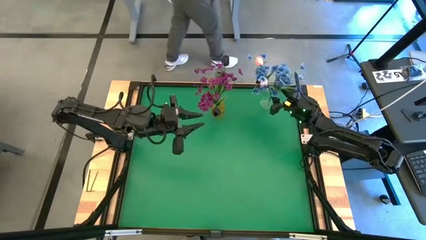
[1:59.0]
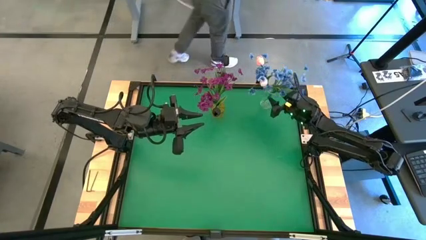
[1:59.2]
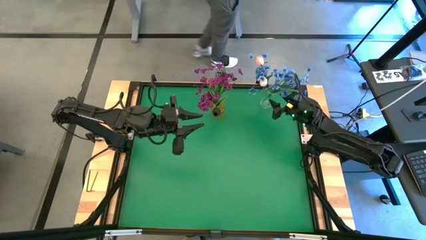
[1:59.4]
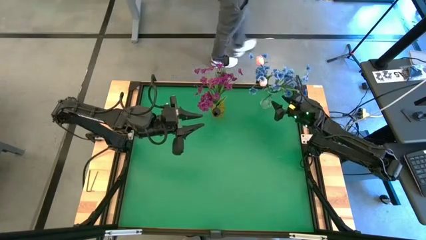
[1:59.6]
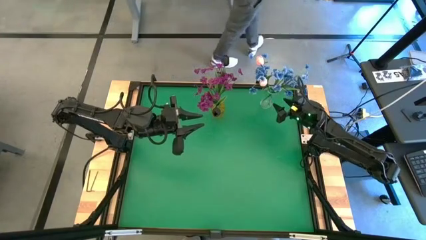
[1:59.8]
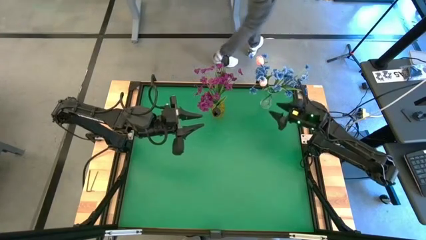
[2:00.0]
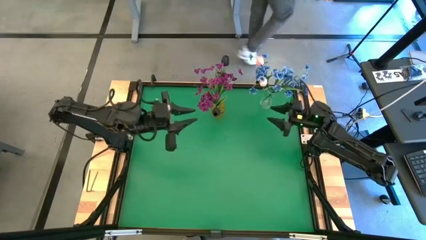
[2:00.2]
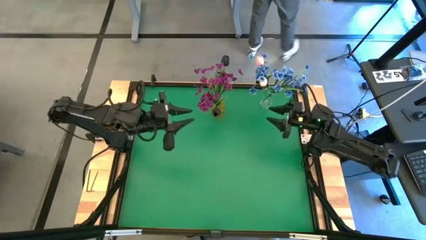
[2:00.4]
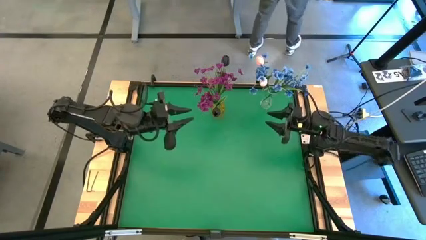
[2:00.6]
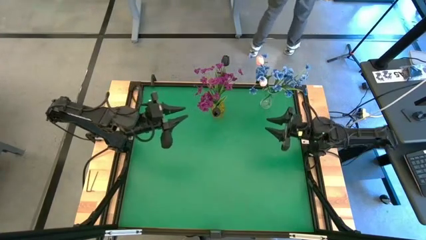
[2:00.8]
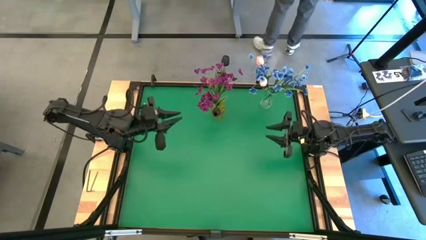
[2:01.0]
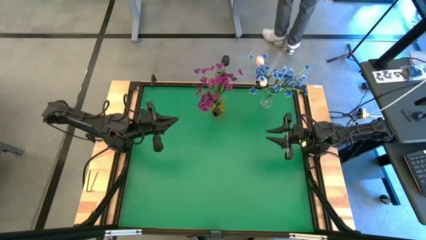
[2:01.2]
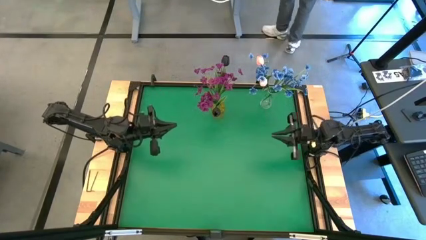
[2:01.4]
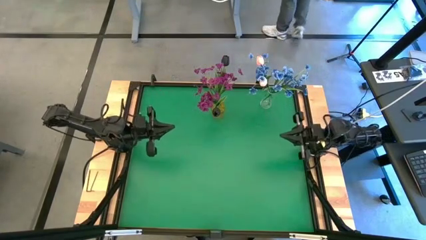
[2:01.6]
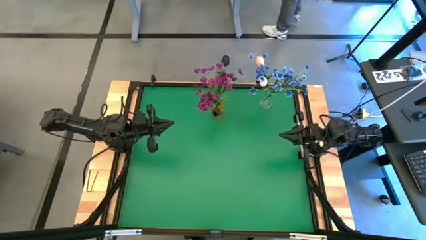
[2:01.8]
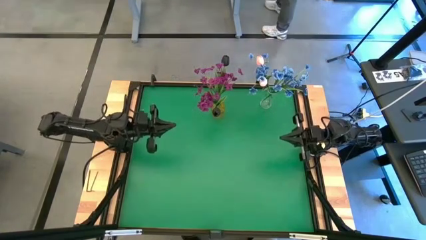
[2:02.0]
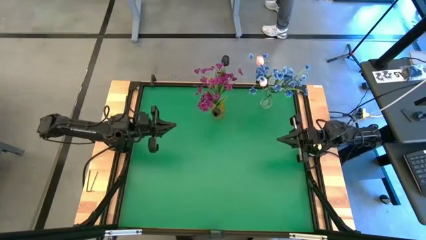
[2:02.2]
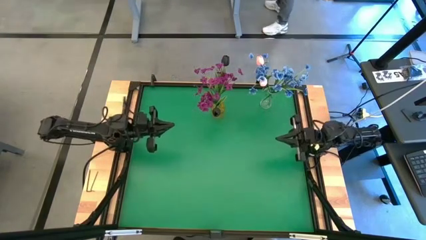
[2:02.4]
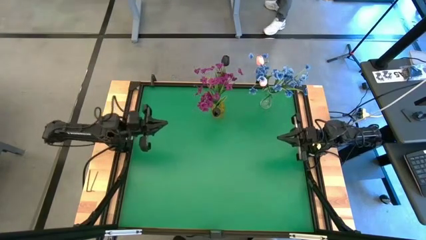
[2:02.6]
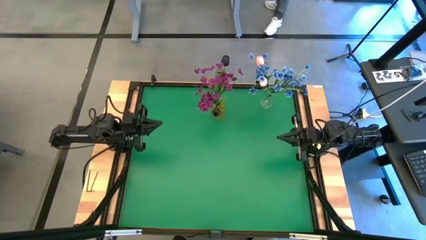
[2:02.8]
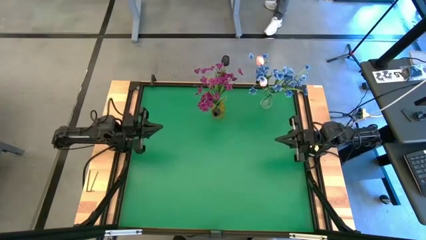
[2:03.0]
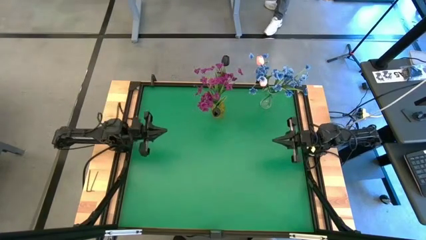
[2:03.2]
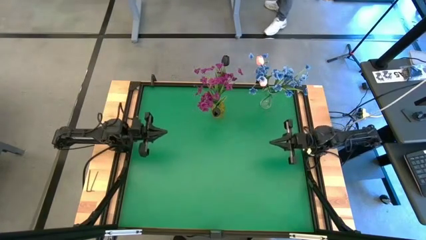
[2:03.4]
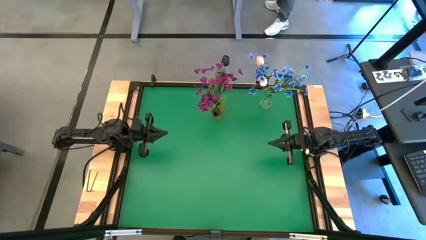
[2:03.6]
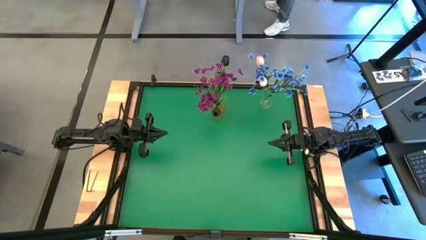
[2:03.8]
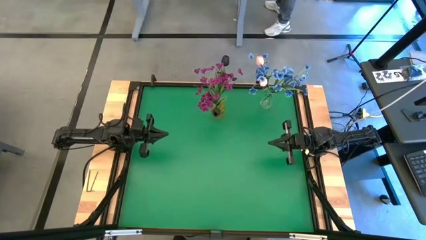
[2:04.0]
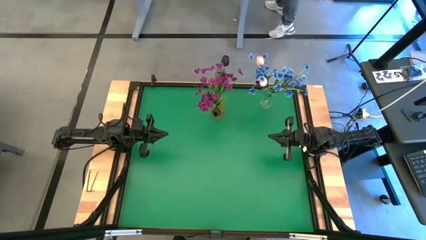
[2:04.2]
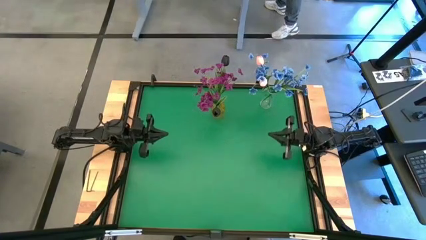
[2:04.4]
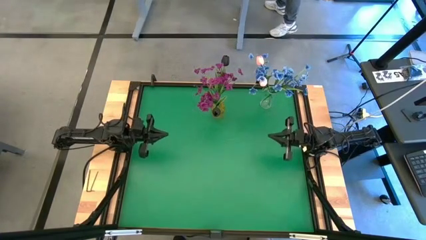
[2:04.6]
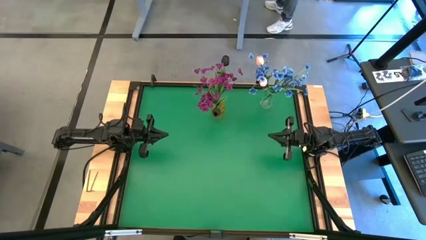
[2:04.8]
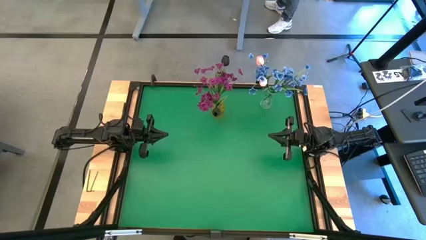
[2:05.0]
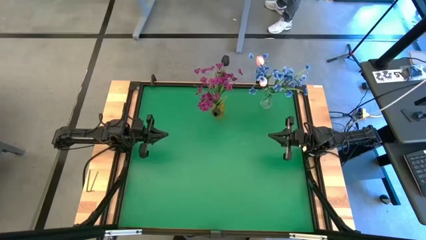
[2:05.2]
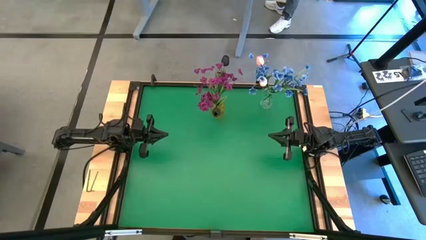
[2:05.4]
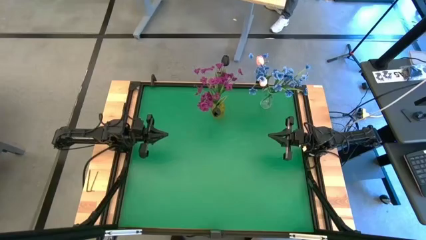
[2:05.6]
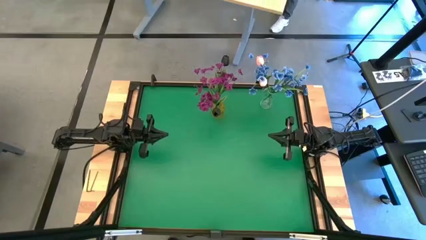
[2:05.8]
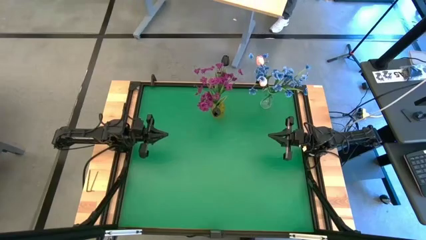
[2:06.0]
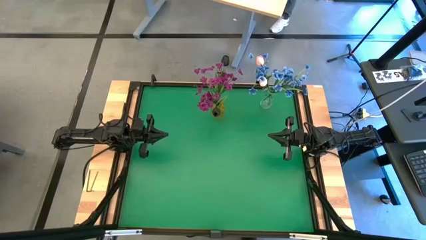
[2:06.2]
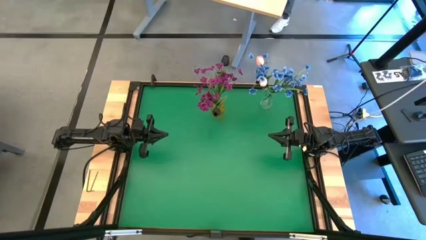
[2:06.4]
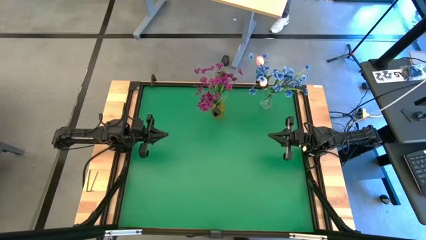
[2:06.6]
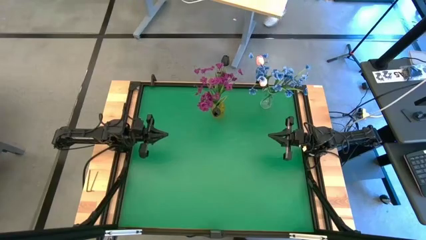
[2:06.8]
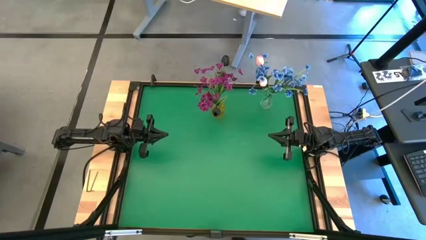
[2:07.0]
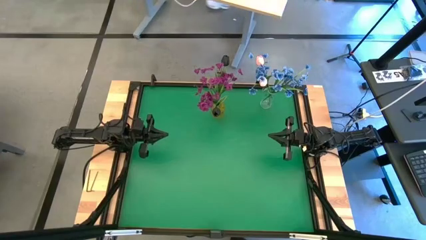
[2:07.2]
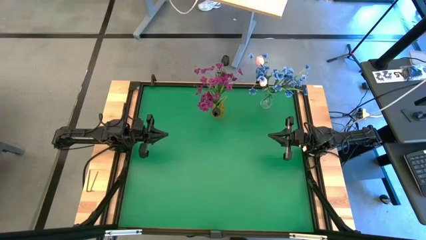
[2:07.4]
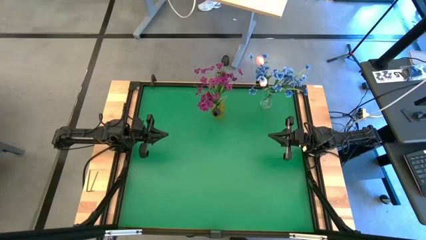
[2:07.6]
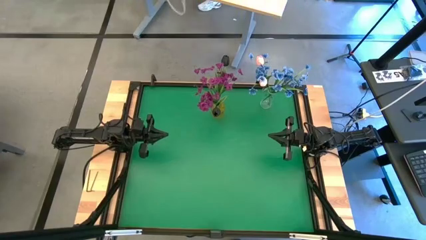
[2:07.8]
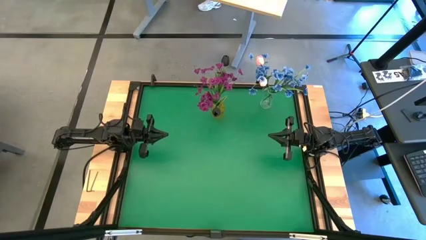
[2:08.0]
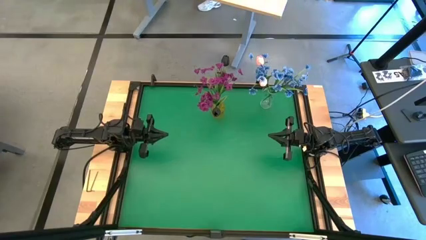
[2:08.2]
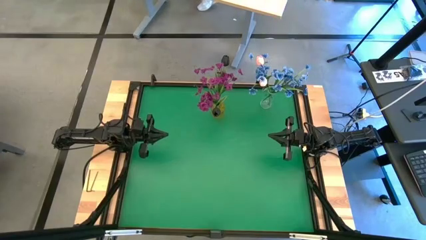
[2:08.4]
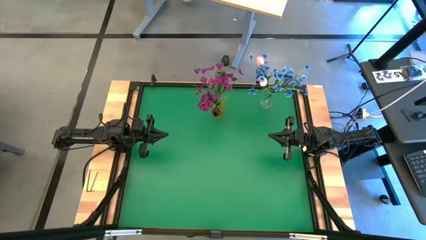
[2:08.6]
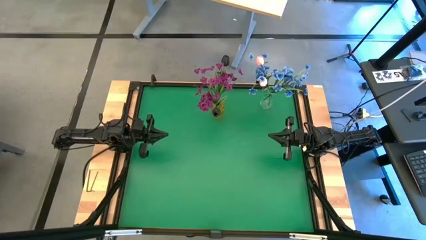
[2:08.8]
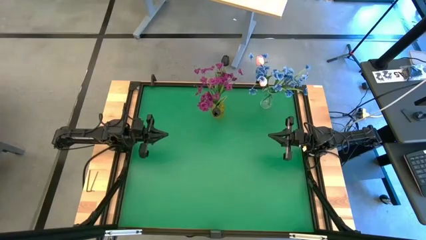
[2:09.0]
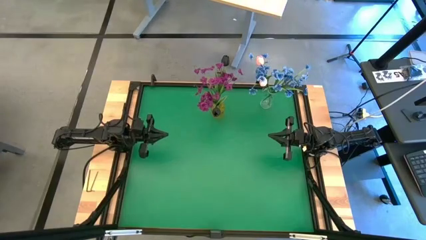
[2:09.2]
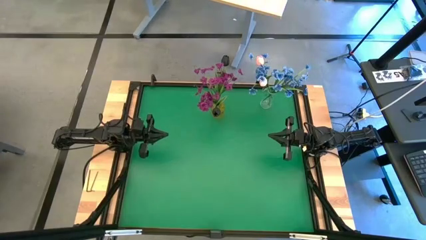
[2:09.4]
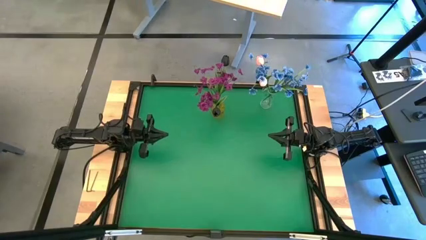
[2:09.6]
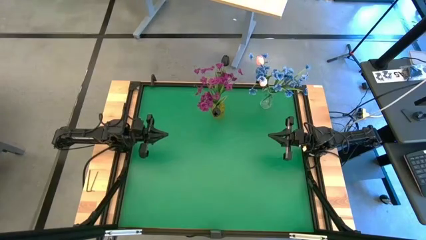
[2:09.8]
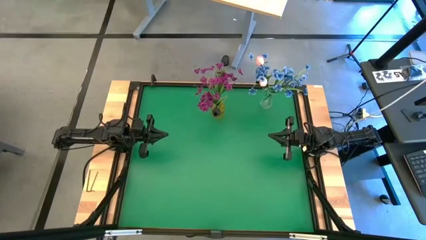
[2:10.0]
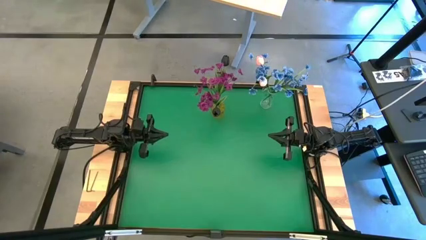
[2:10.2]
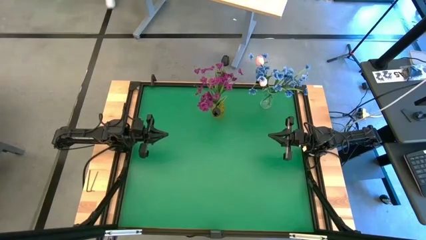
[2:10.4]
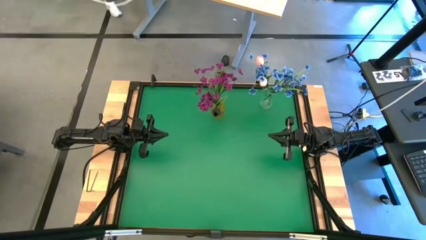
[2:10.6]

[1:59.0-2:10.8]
Task: Sort flowers into vase by color
Return to Home Position

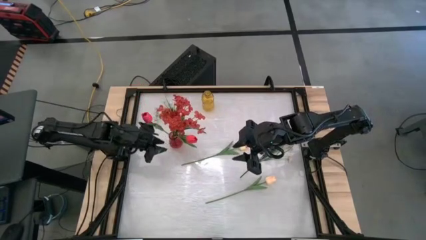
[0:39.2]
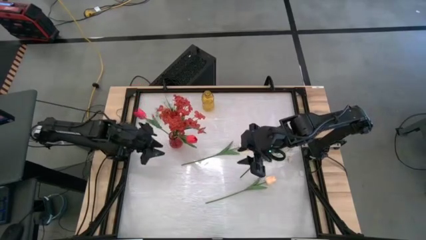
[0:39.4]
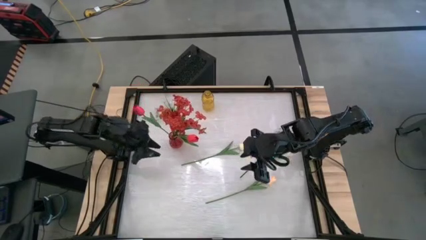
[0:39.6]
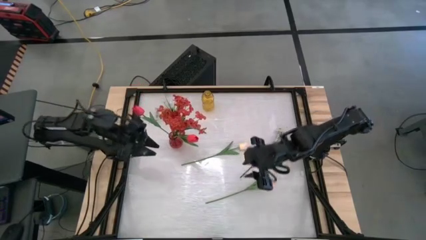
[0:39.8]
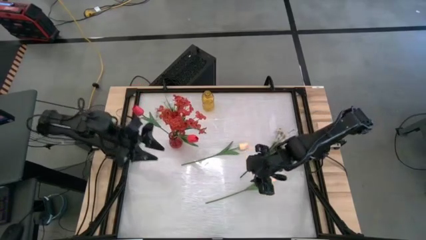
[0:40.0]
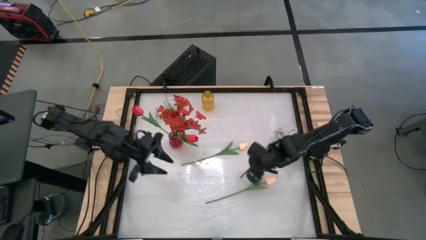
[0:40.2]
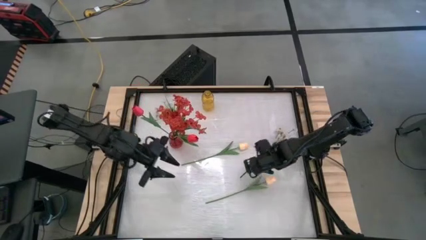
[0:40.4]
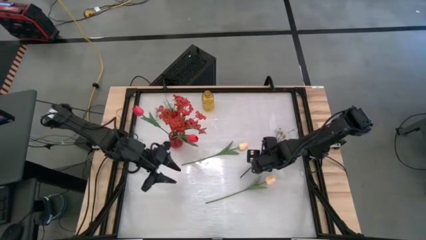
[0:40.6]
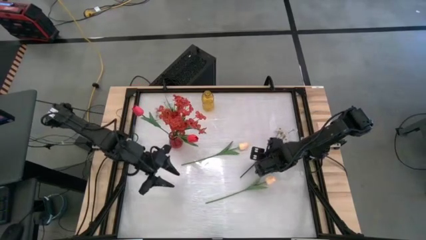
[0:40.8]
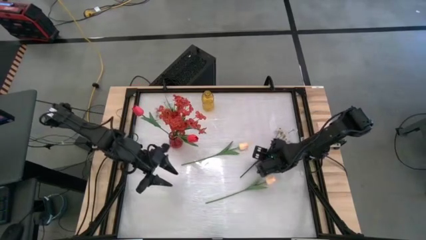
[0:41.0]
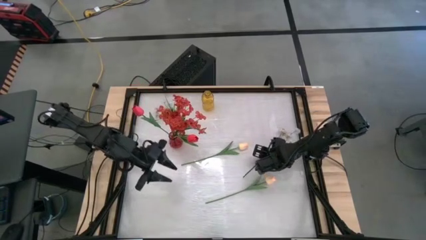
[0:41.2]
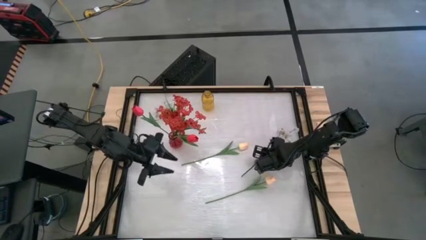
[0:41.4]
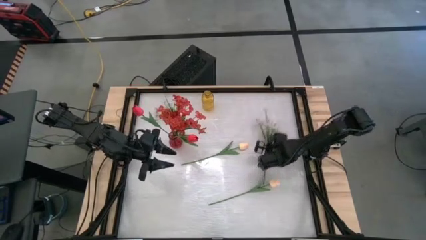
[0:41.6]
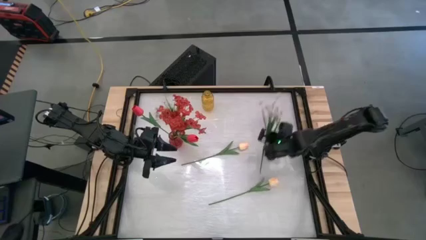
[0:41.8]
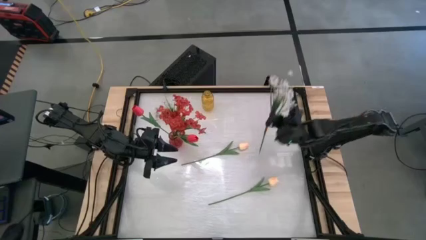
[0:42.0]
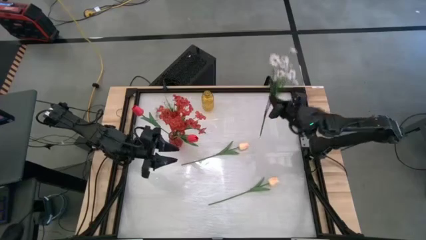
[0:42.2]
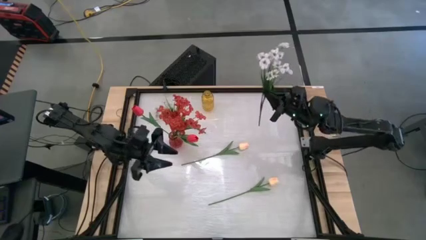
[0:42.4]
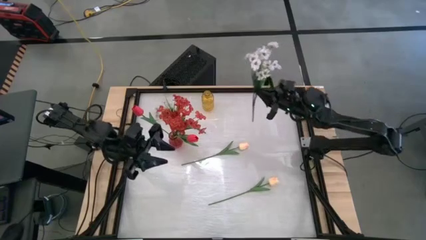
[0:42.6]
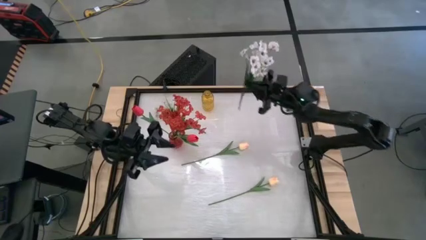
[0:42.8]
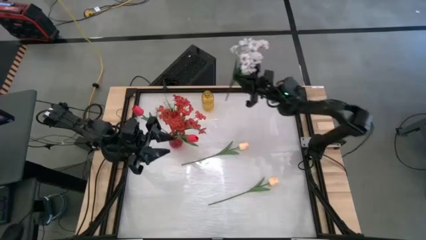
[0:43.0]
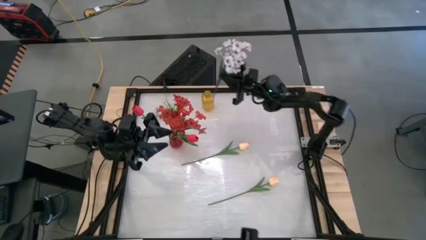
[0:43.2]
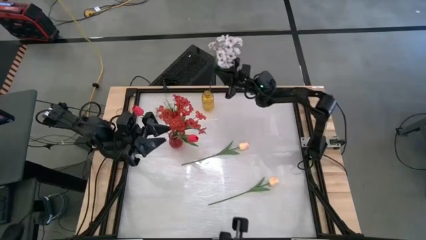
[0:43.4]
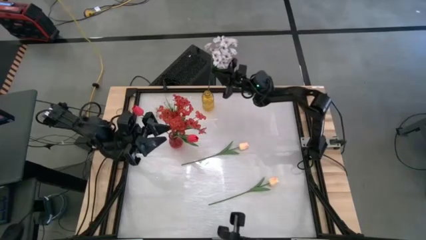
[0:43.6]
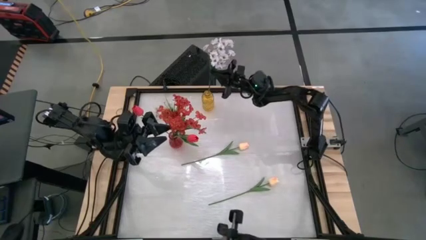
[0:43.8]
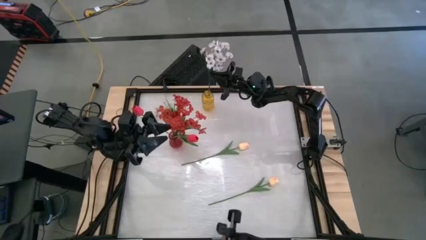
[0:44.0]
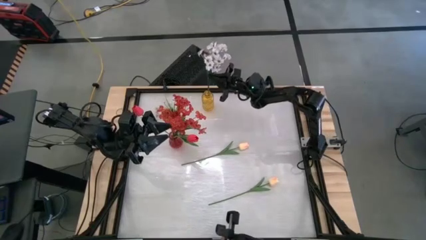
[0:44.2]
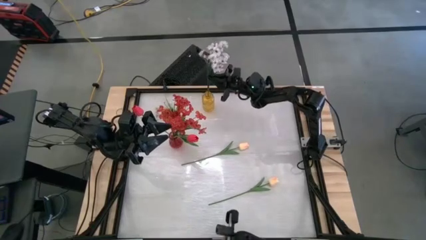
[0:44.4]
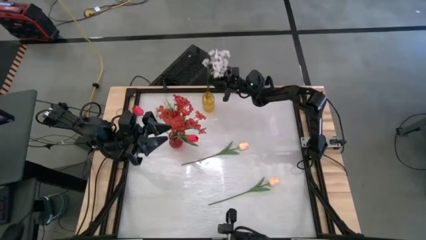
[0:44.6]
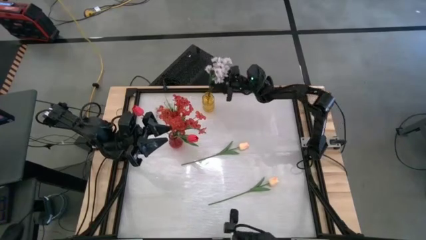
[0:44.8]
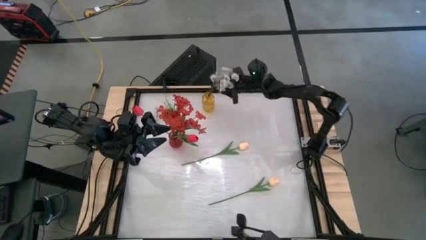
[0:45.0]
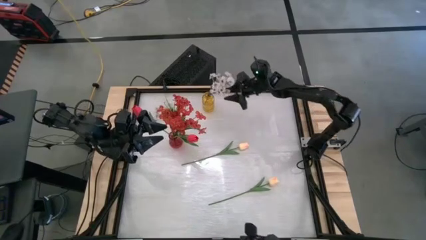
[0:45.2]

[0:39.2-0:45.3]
Task: Sort flowers into vase by color
Put the right white flowers into the yellow flower vase
